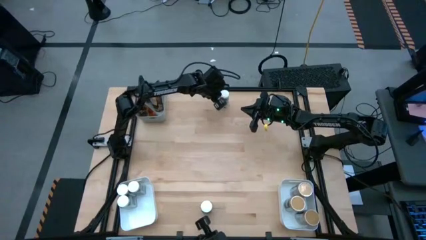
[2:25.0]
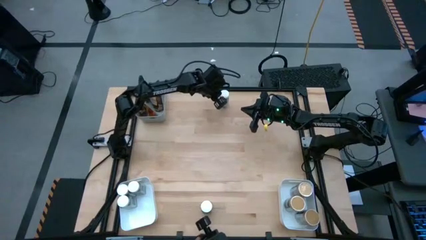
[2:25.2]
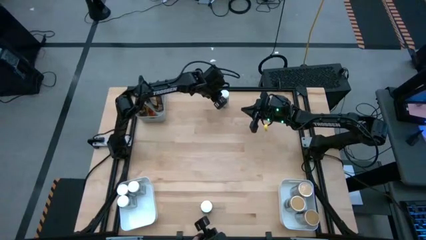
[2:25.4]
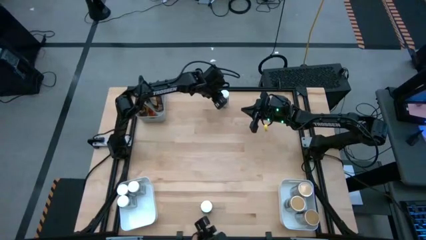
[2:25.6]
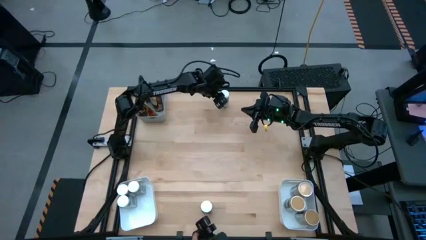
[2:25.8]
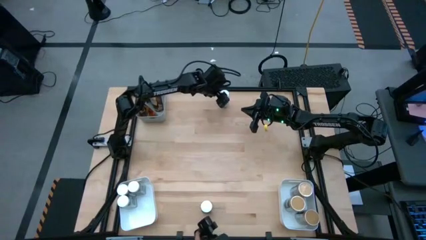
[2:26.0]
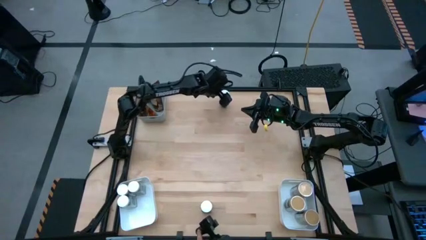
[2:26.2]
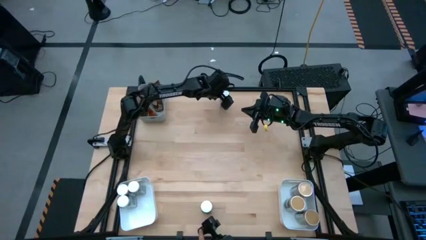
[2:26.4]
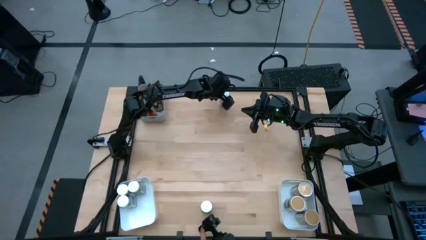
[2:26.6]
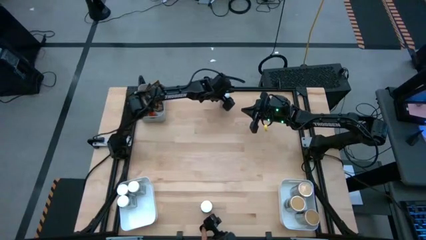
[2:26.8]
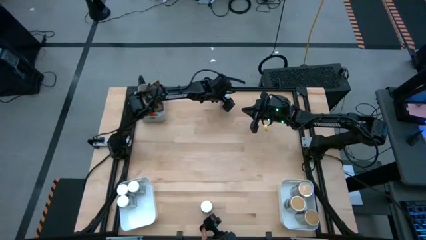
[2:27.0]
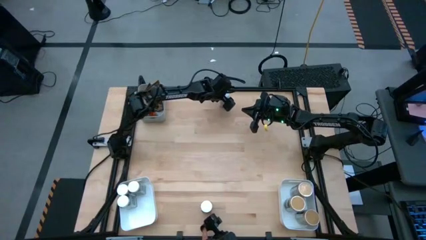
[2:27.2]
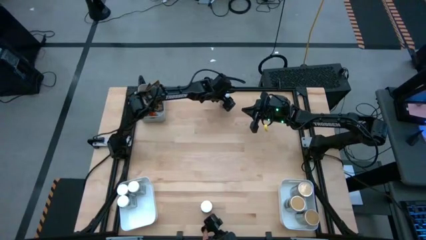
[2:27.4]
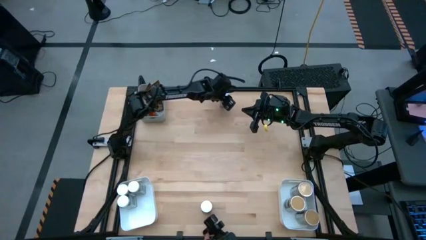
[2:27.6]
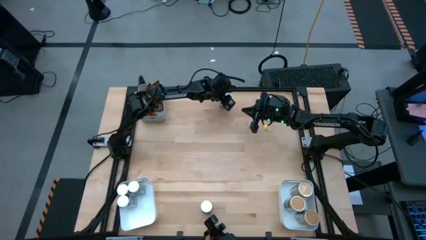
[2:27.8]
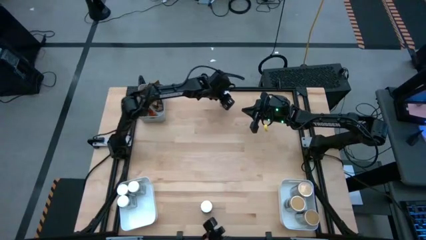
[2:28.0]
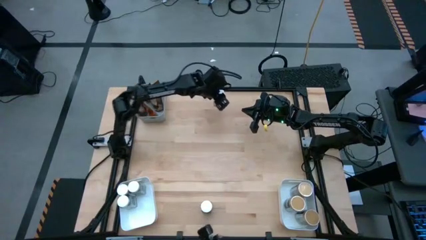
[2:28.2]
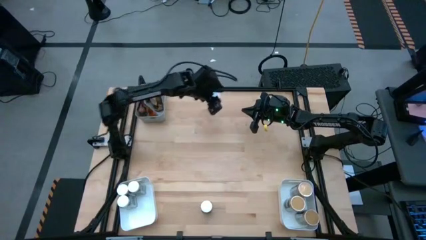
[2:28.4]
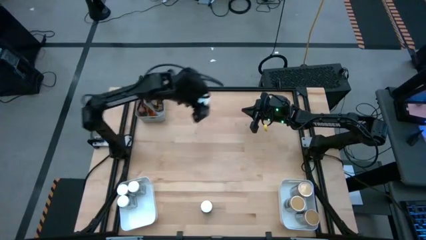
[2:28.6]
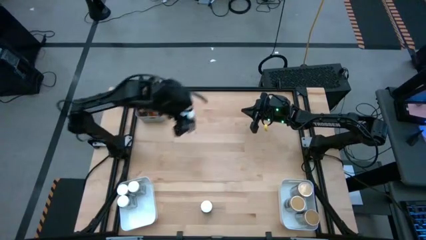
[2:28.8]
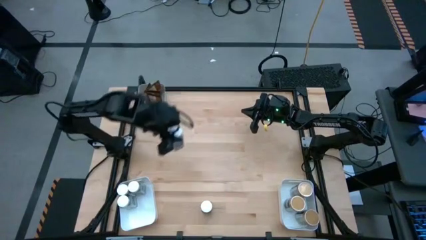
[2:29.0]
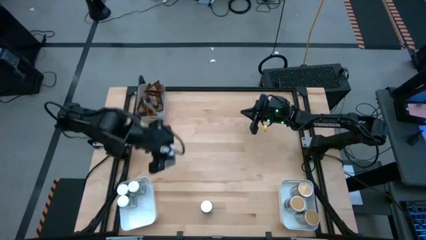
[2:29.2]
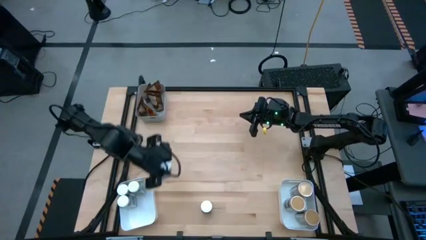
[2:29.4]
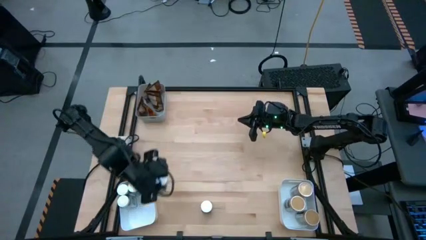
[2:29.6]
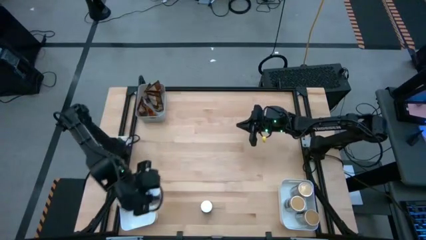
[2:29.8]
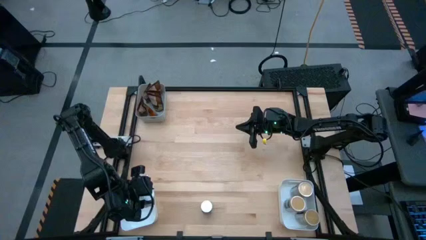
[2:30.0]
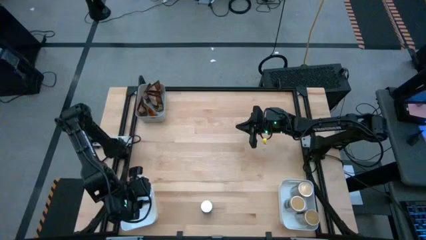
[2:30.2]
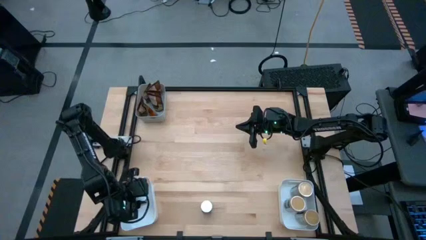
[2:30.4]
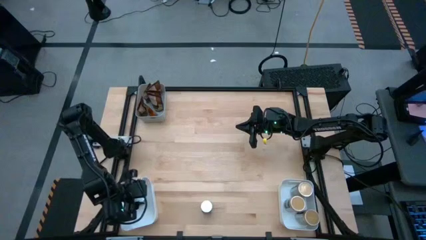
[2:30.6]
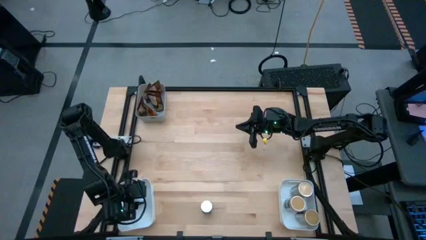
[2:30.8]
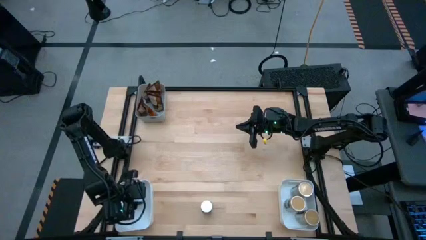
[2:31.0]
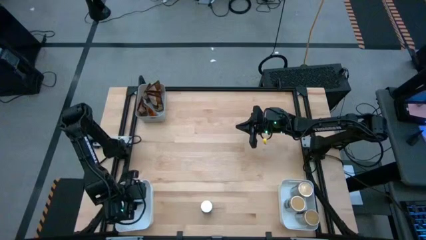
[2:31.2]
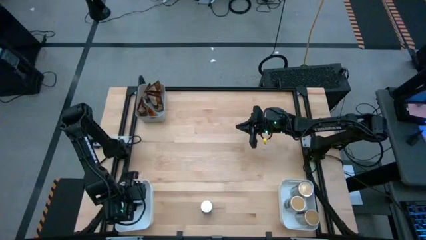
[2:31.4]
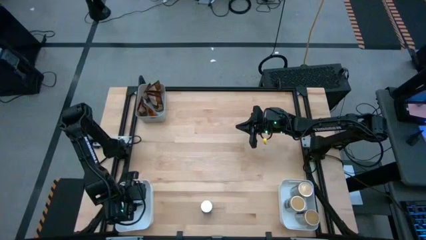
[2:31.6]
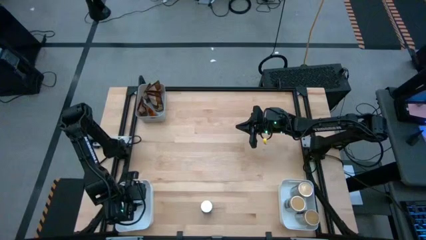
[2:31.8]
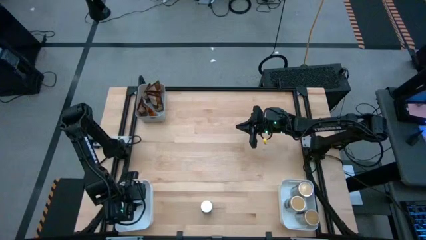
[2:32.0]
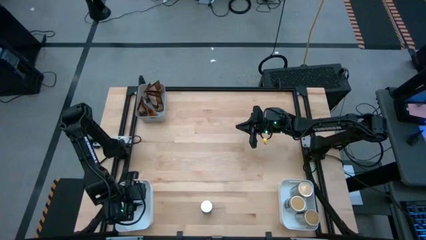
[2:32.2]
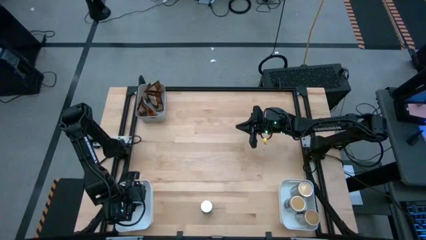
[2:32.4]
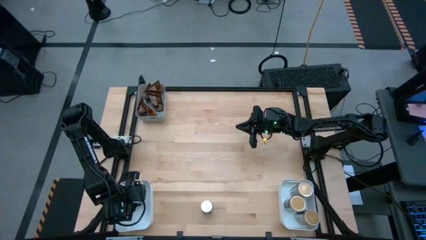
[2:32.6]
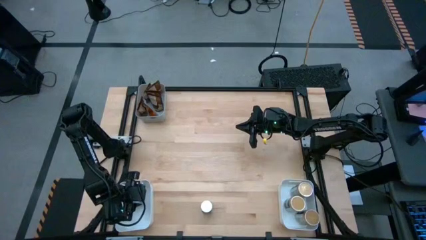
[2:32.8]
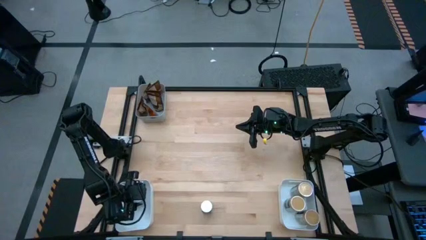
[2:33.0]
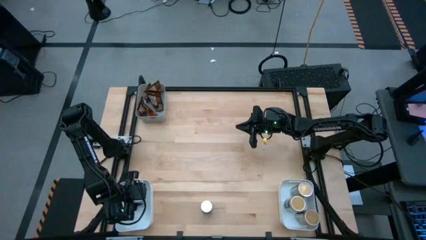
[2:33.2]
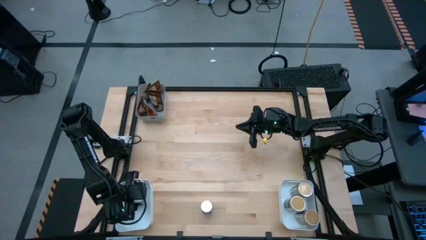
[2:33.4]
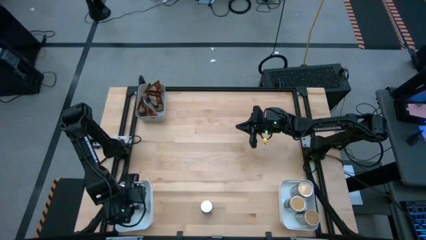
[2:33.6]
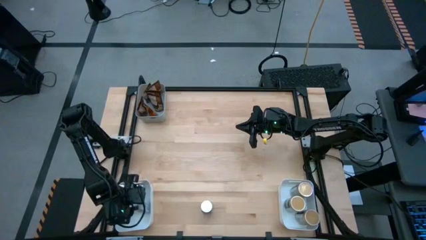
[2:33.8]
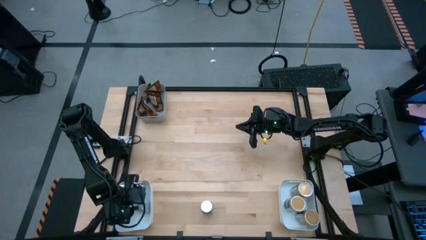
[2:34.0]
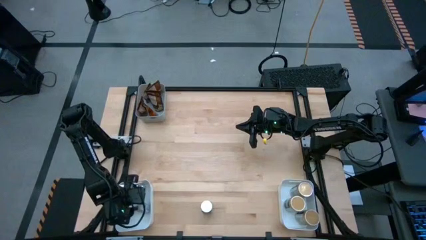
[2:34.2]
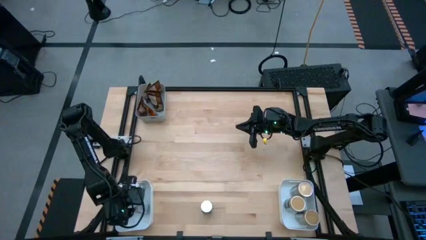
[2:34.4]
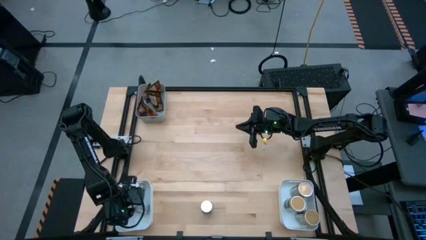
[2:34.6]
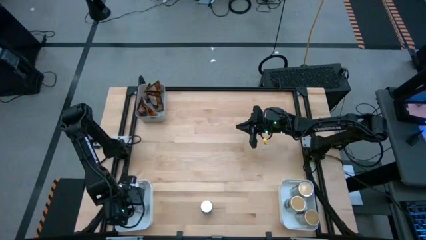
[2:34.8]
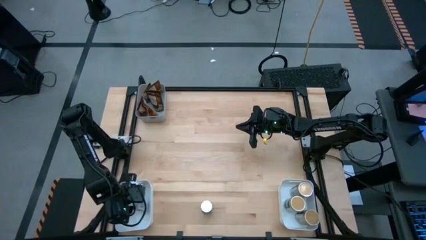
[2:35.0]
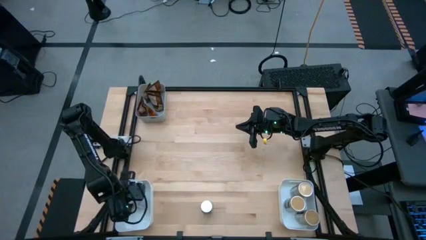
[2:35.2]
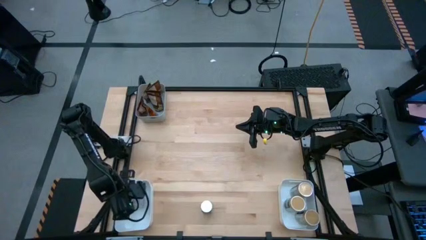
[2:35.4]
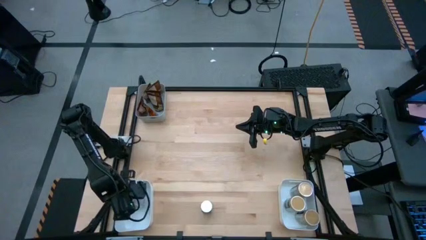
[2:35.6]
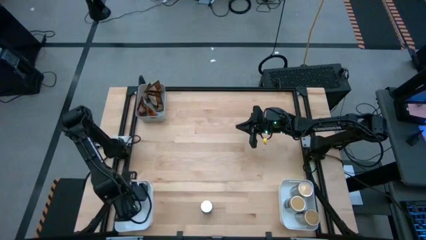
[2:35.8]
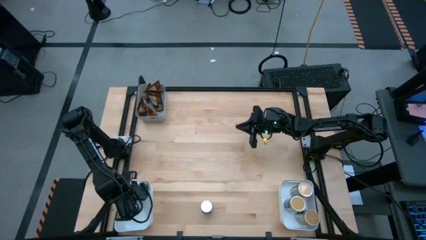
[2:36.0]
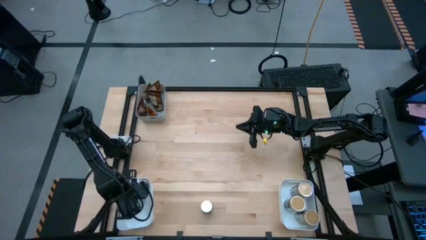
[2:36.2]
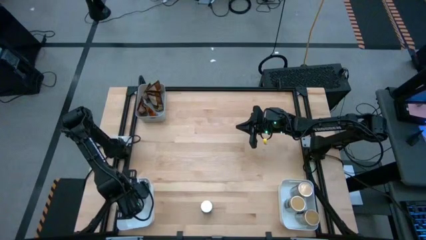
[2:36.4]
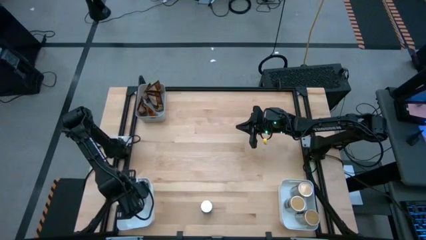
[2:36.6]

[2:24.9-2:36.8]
Task: Sort spices by type
Put the white seasoning bottle into the bottom left white bin
